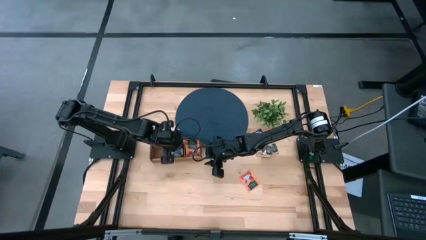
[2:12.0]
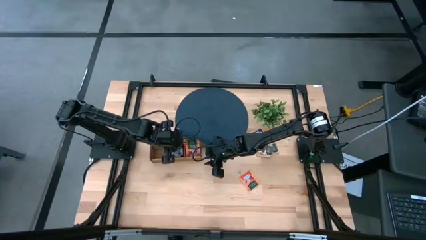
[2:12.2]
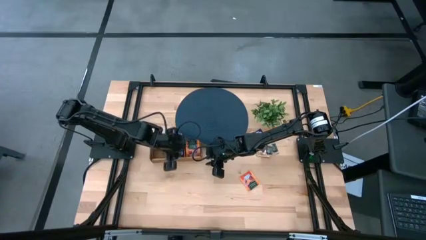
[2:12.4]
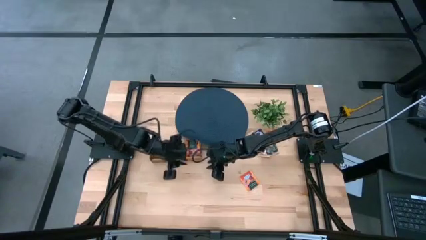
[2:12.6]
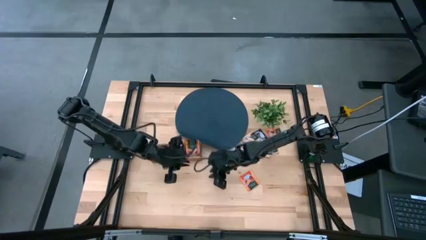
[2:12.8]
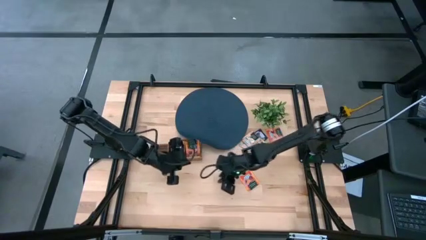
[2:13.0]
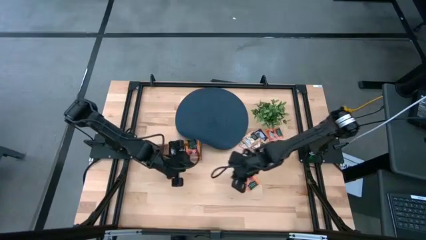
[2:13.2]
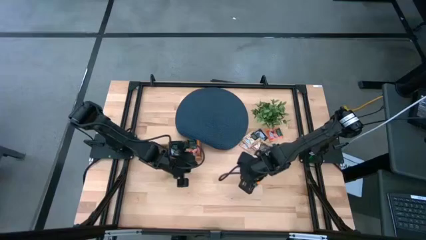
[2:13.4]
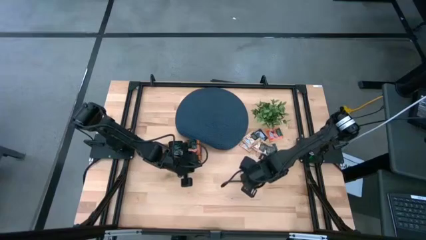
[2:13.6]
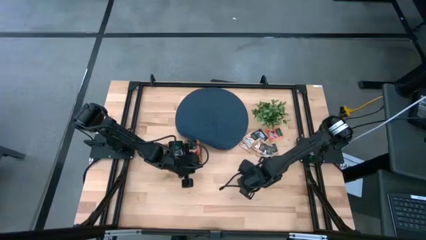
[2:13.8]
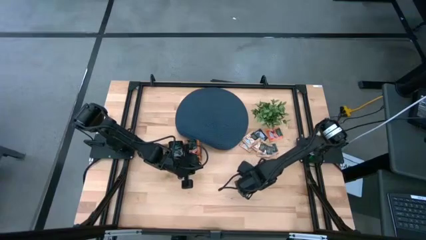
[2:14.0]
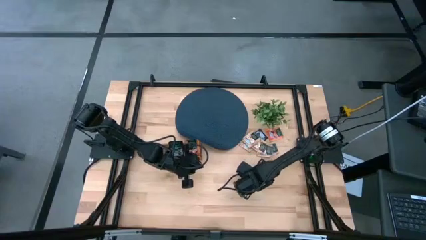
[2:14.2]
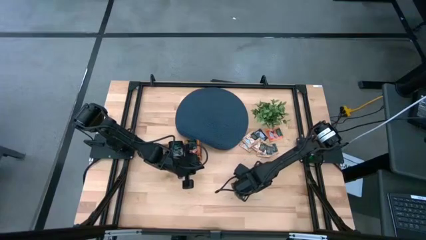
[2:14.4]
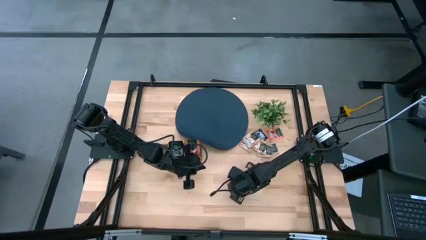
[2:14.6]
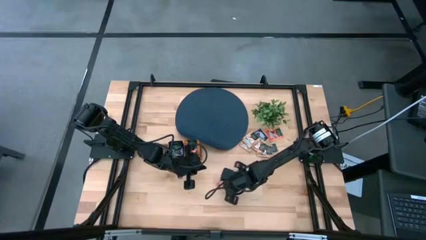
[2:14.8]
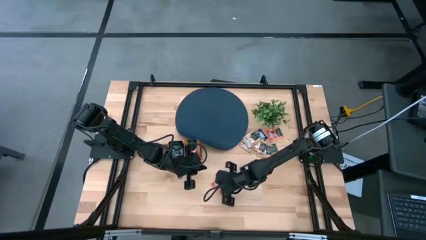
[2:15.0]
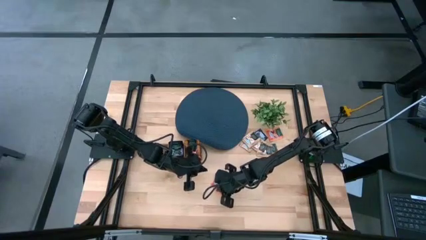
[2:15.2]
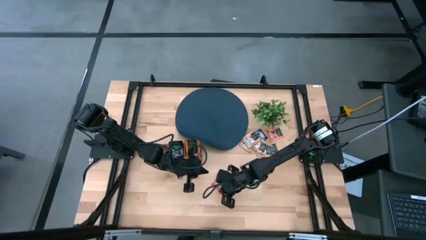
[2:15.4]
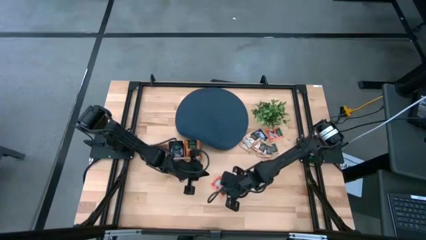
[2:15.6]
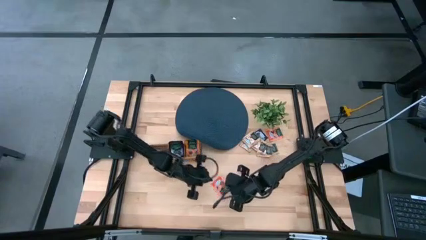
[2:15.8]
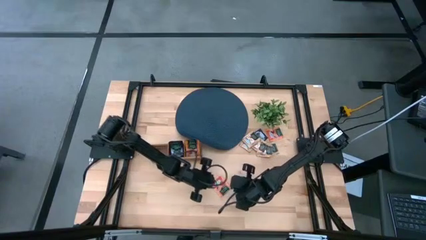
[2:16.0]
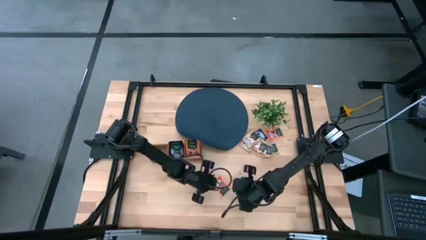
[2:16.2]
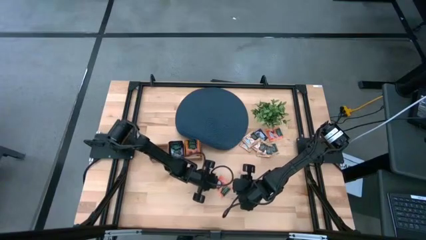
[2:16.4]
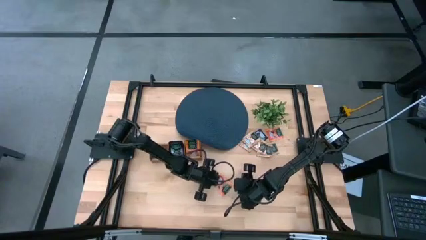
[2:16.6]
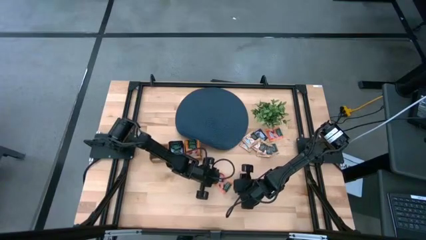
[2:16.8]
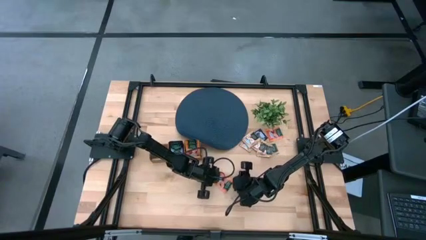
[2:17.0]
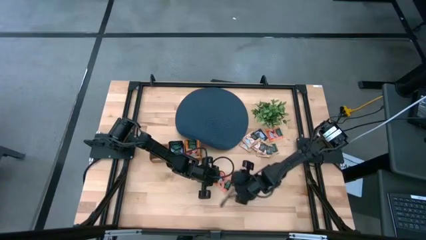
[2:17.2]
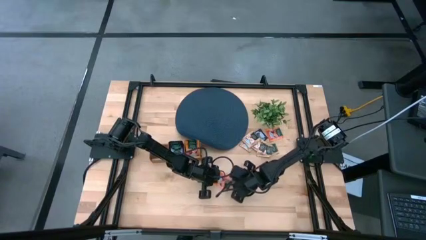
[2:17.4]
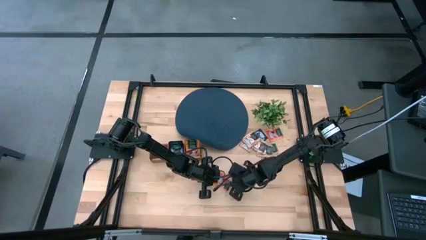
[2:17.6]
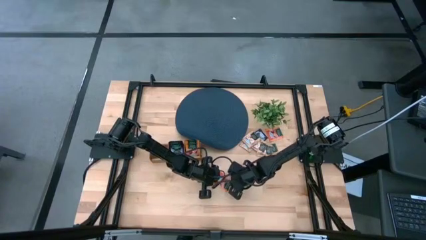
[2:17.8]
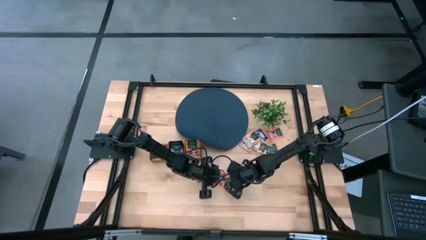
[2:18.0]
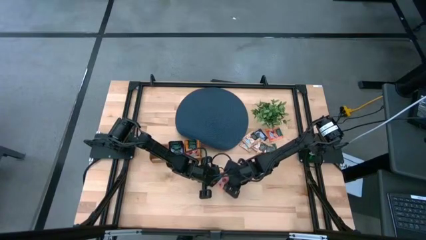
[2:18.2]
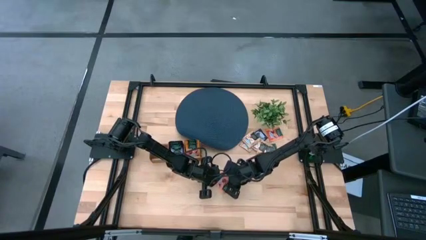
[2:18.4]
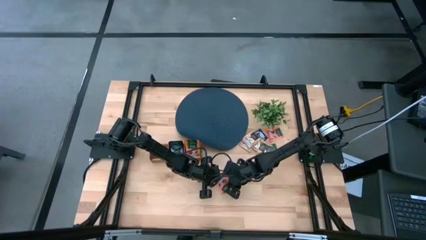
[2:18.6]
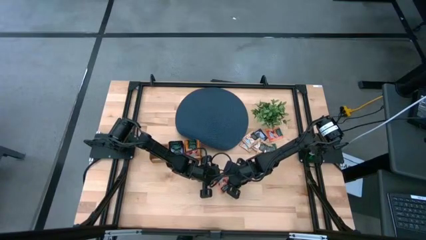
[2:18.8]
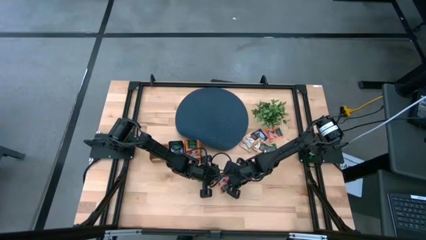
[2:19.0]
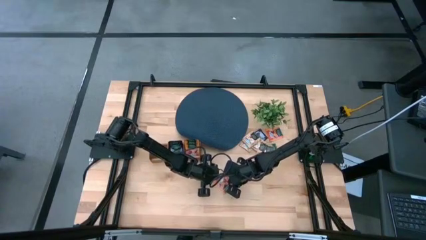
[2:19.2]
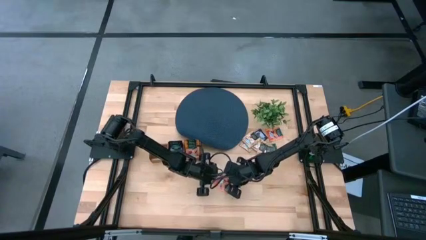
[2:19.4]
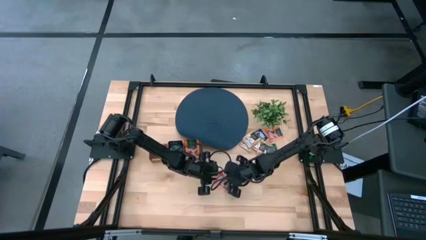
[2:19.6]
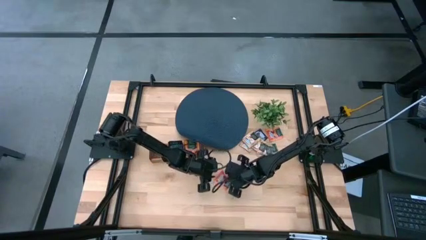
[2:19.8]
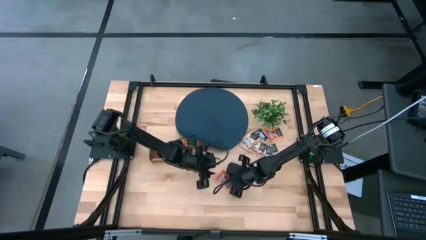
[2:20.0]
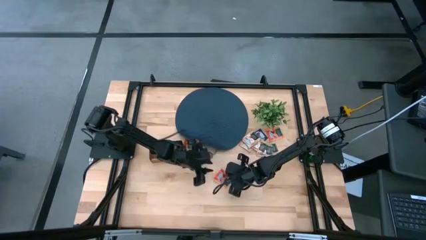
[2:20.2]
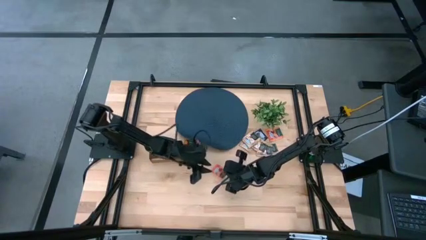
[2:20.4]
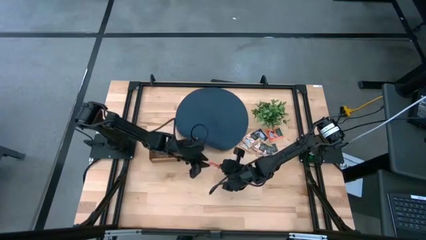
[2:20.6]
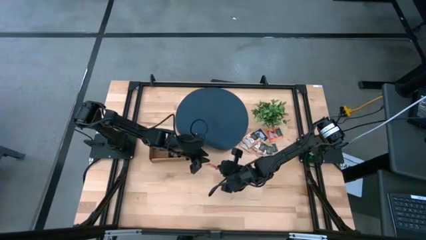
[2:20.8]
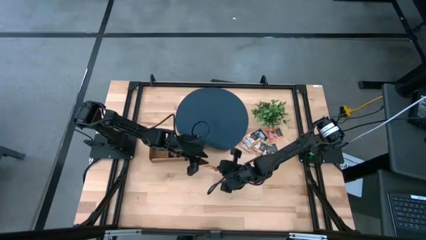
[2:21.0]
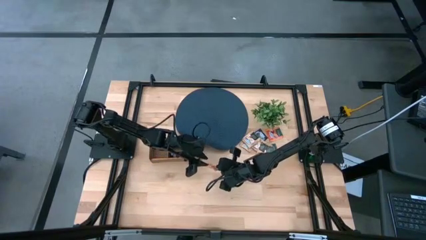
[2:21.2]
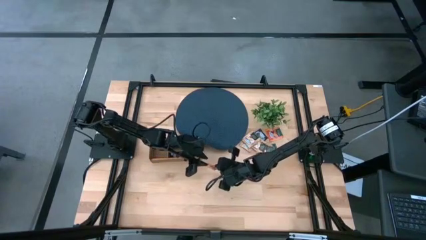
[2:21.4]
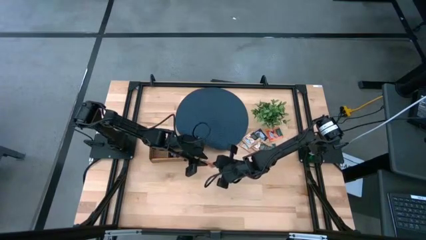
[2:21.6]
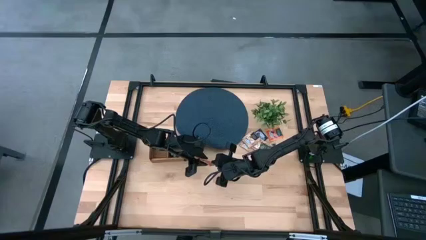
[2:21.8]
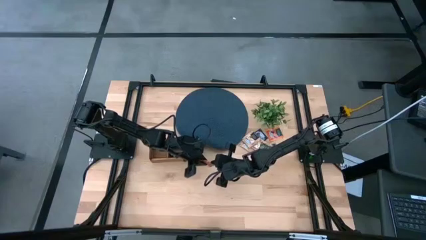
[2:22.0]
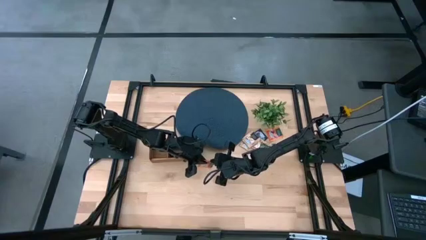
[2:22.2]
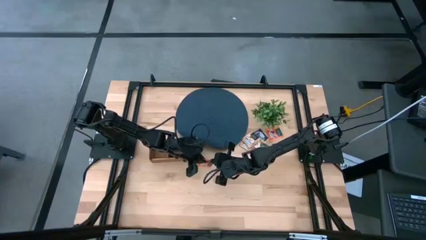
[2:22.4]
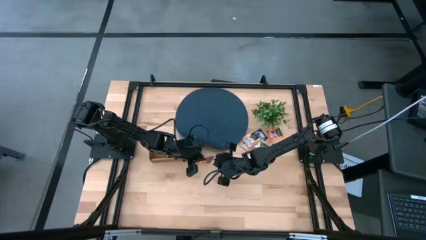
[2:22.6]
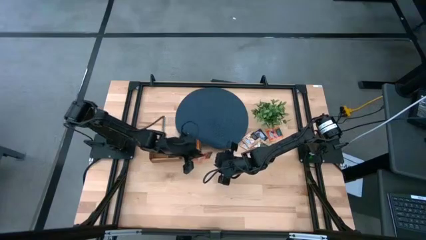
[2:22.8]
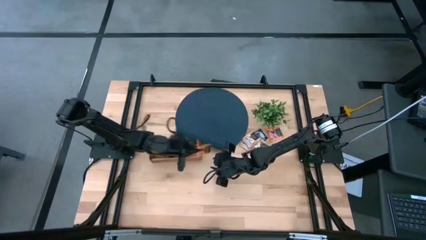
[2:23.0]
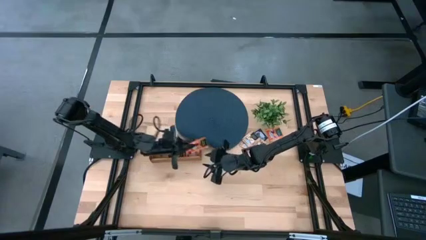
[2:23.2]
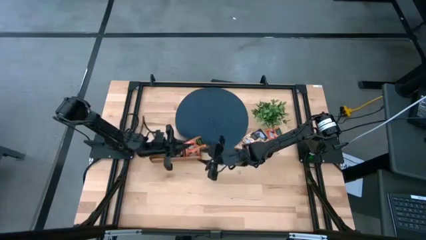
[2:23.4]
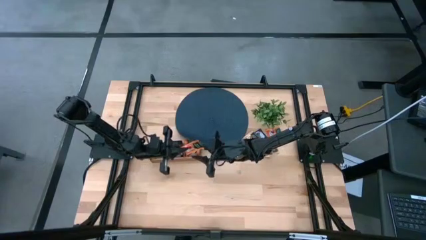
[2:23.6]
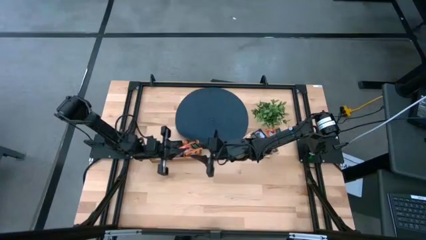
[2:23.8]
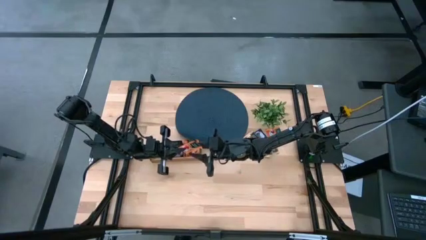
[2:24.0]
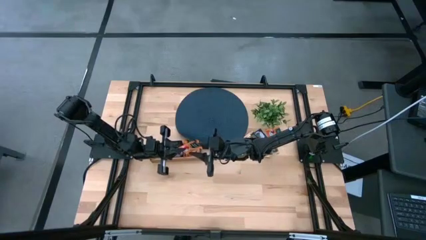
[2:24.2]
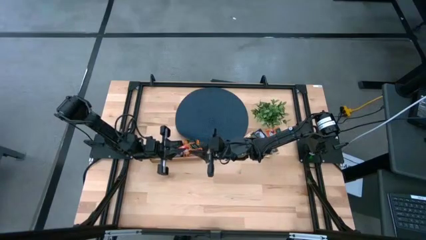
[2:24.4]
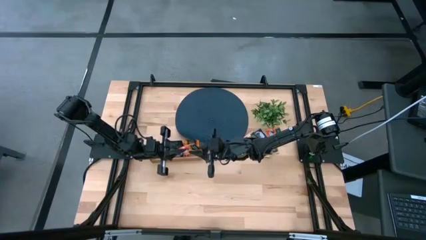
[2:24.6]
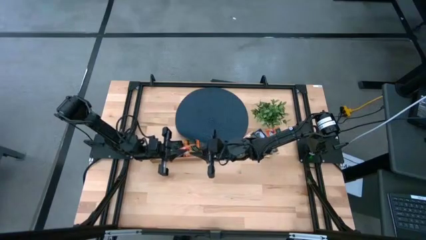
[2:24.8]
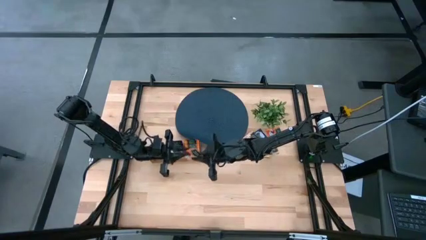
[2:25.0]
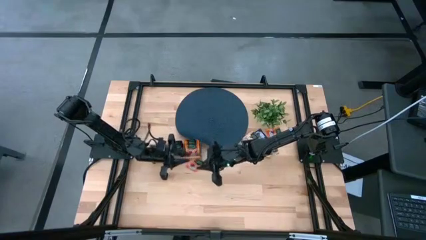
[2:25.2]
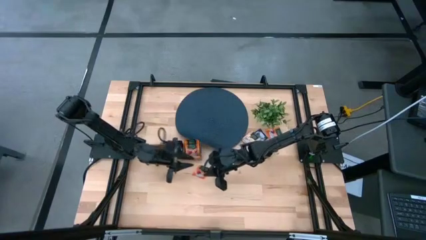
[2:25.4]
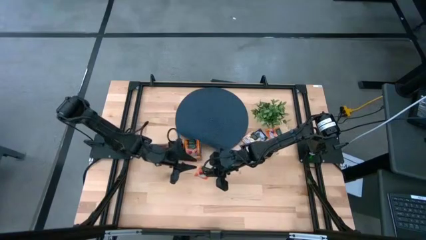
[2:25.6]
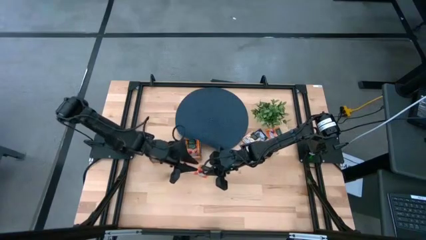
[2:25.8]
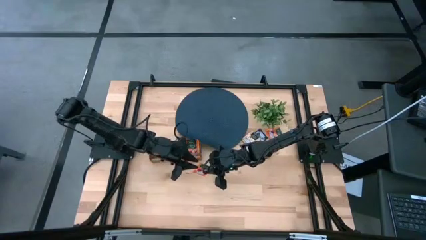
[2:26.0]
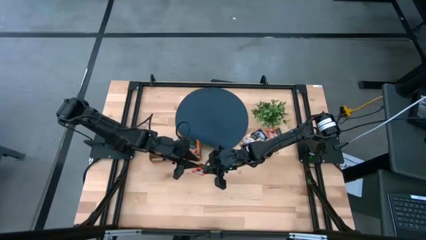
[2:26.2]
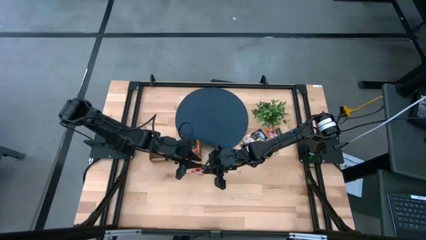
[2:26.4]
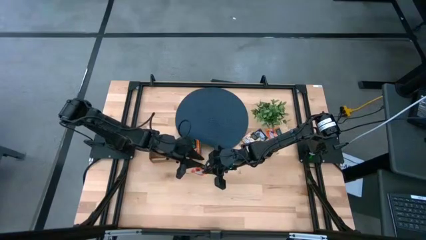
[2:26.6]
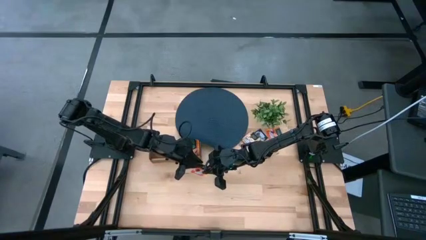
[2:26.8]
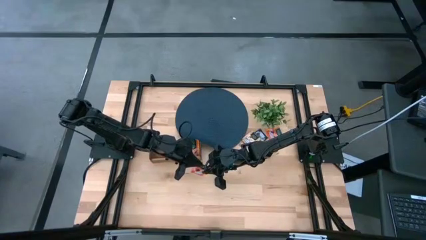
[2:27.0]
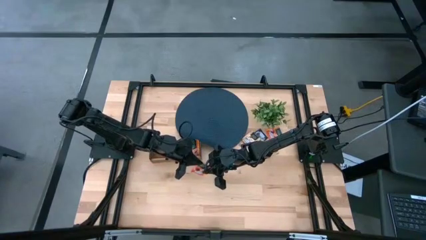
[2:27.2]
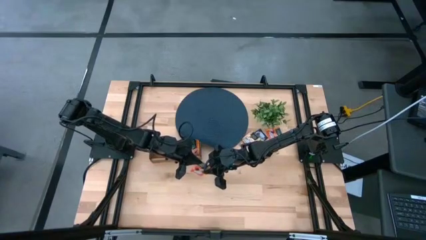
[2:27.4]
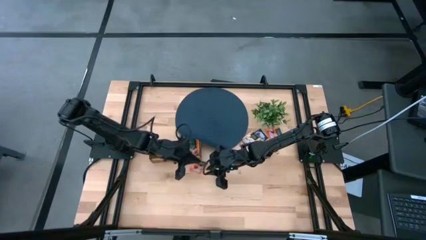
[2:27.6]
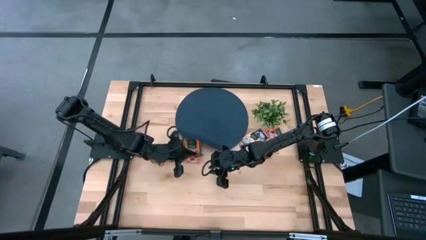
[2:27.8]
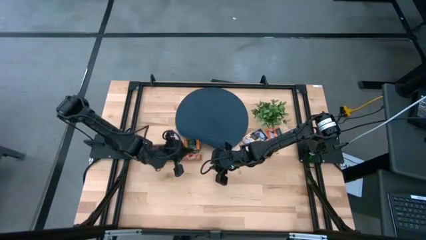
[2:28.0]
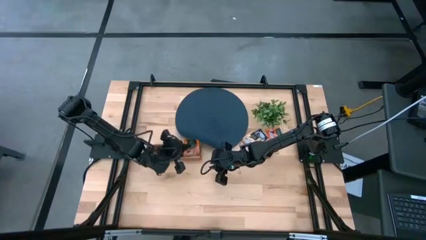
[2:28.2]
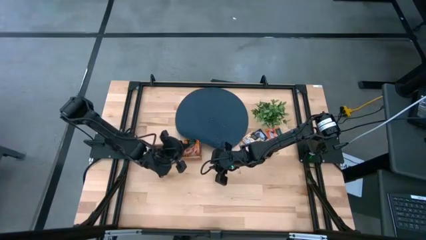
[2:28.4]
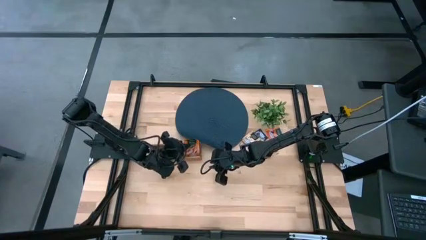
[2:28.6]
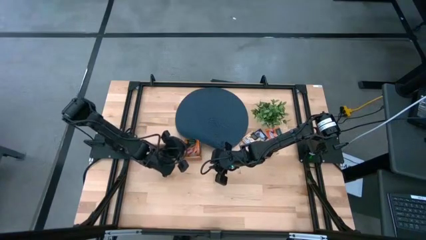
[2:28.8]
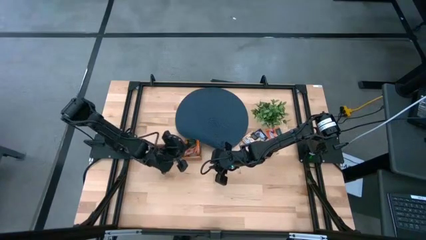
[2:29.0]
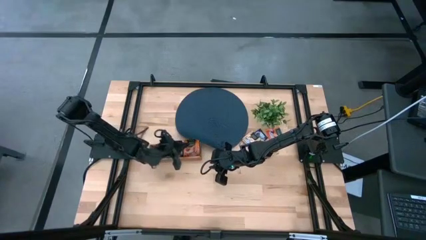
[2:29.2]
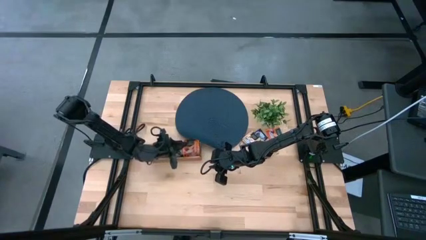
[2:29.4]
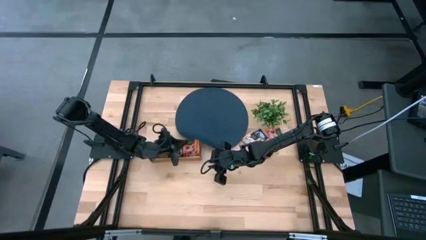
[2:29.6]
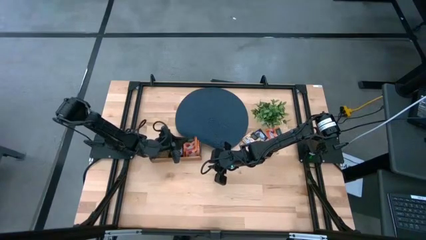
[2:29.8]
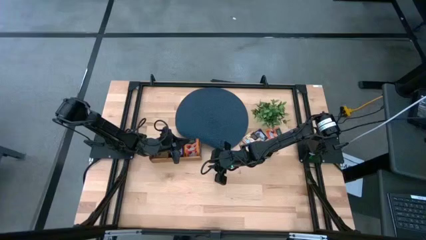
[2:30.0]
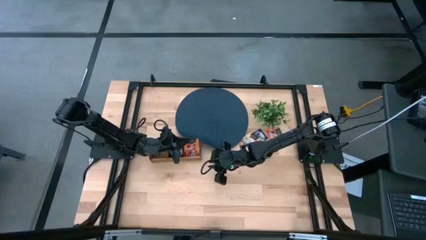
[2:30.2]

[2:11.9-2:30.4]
Task: Pick & Place Tea
Put the orange tea bag into the right section of the wooden organizer
